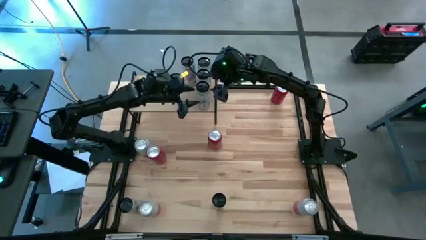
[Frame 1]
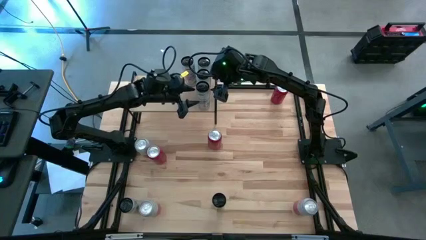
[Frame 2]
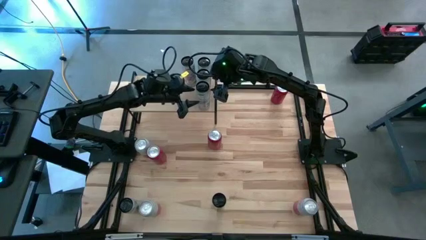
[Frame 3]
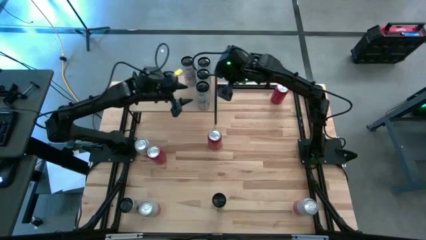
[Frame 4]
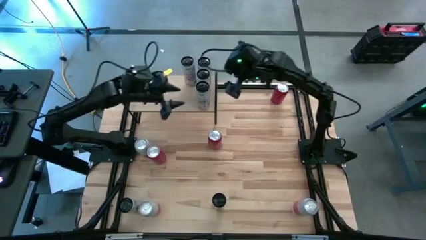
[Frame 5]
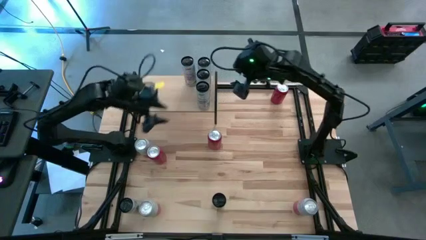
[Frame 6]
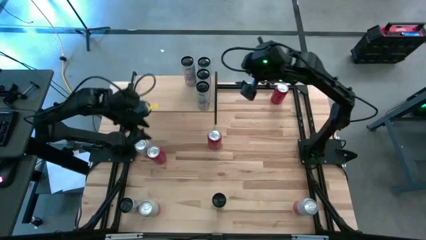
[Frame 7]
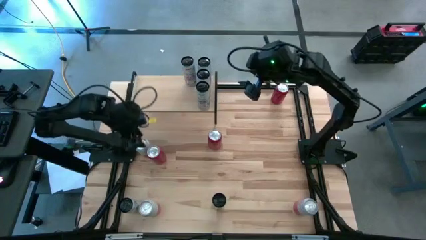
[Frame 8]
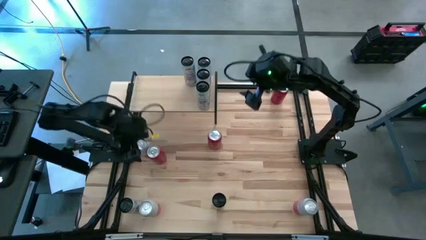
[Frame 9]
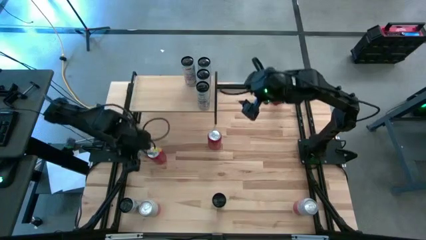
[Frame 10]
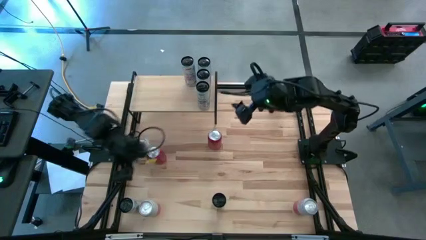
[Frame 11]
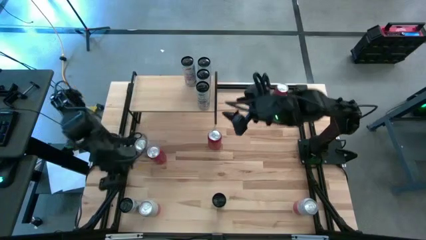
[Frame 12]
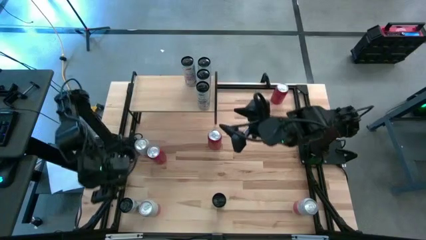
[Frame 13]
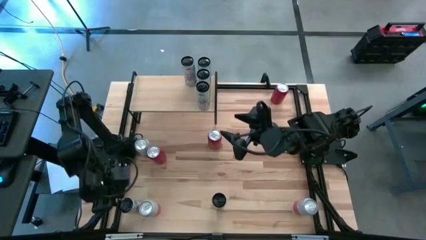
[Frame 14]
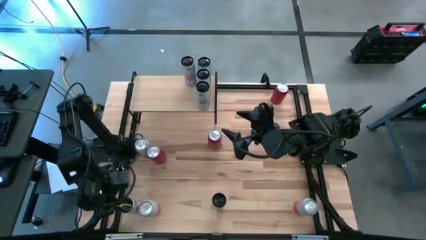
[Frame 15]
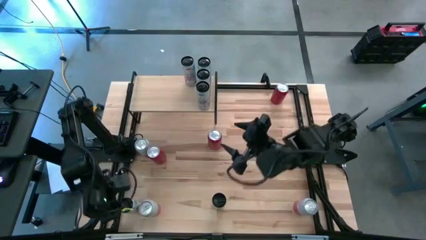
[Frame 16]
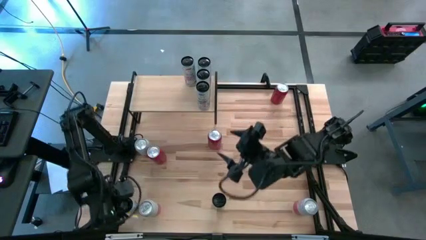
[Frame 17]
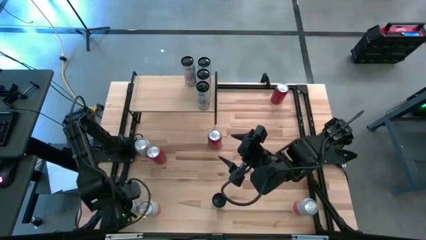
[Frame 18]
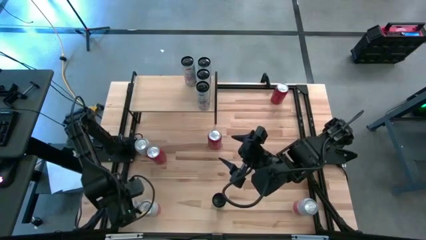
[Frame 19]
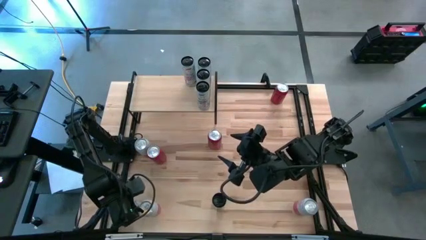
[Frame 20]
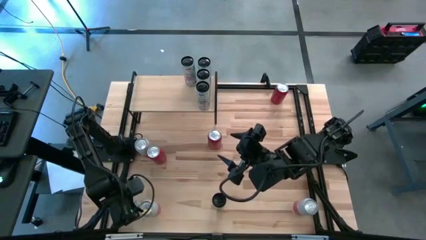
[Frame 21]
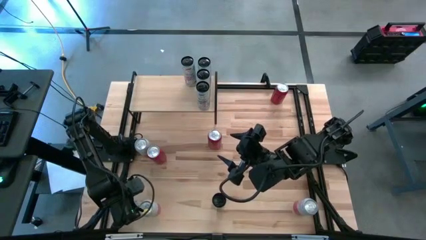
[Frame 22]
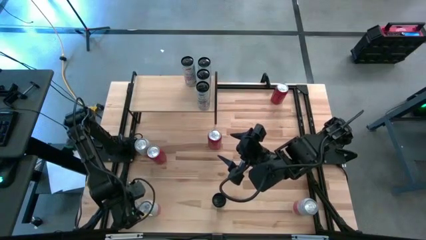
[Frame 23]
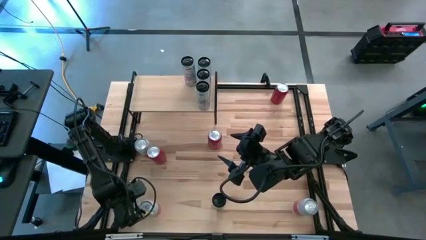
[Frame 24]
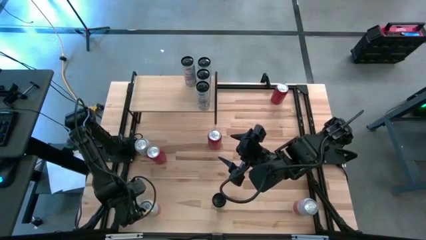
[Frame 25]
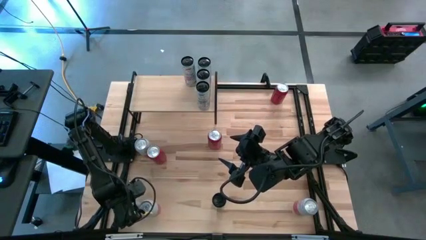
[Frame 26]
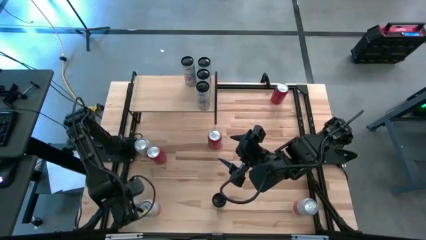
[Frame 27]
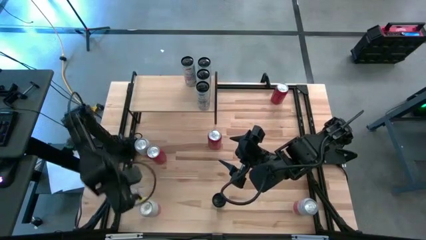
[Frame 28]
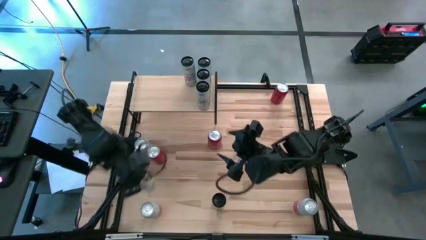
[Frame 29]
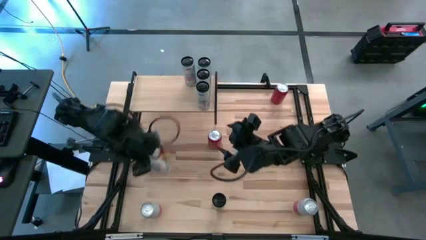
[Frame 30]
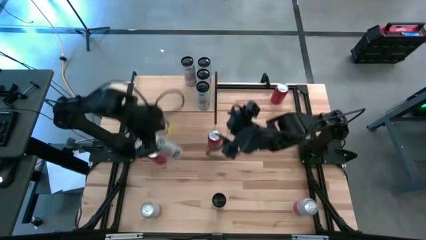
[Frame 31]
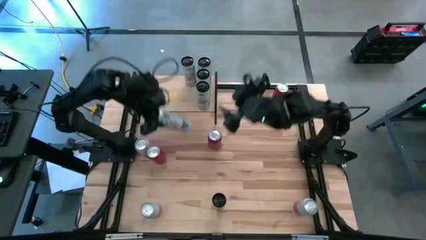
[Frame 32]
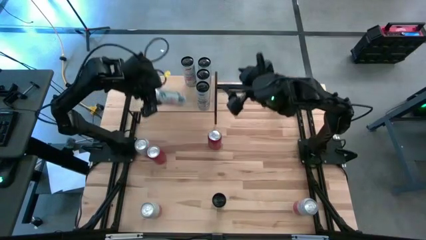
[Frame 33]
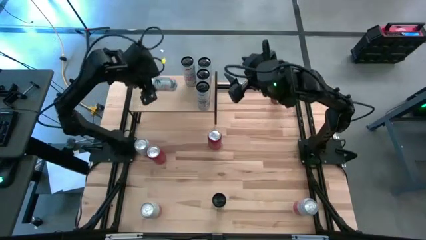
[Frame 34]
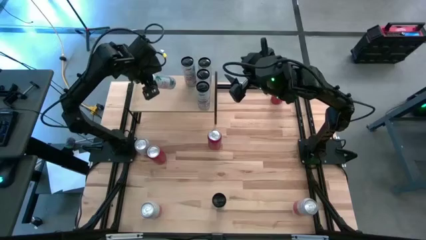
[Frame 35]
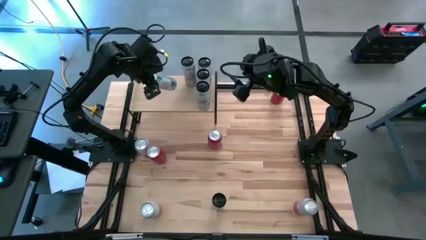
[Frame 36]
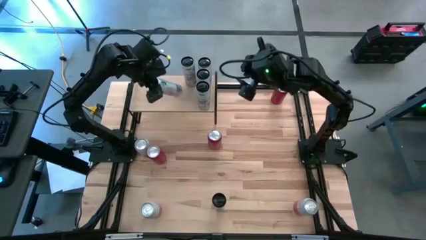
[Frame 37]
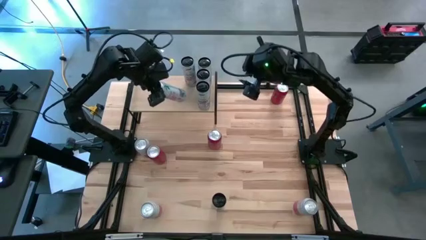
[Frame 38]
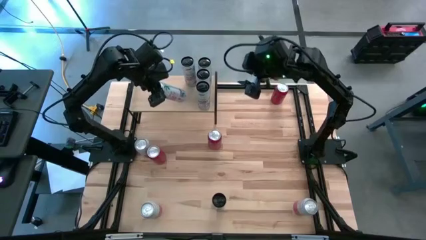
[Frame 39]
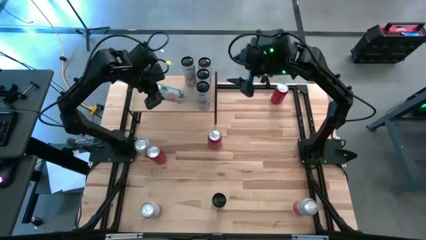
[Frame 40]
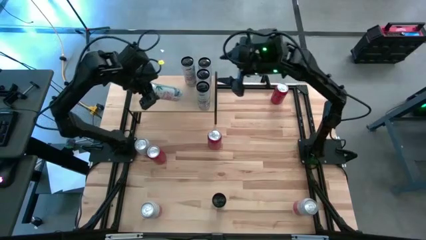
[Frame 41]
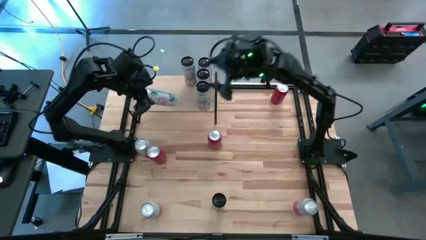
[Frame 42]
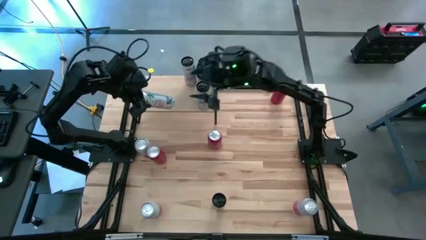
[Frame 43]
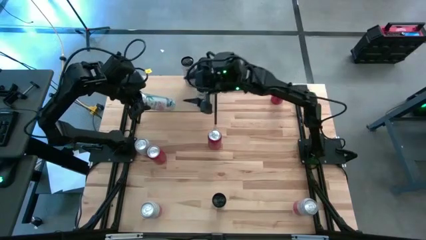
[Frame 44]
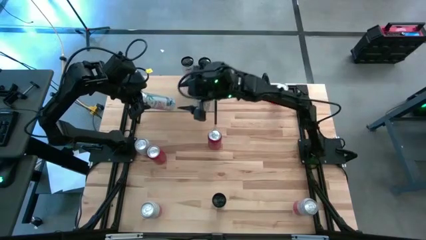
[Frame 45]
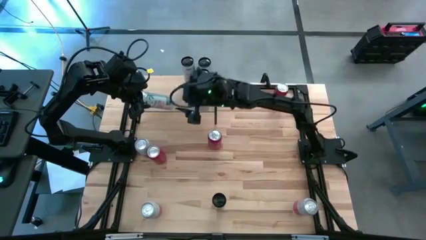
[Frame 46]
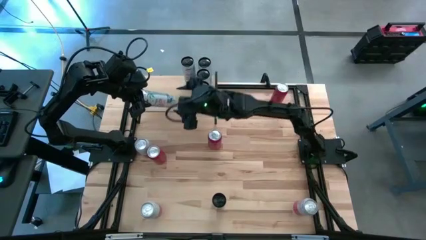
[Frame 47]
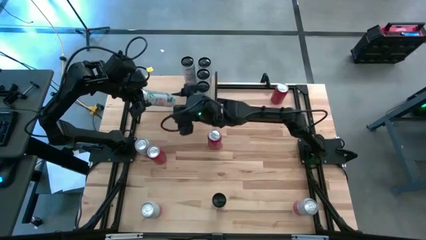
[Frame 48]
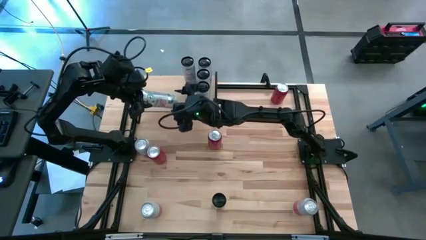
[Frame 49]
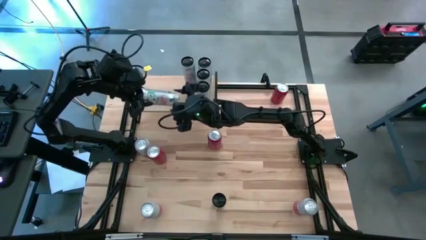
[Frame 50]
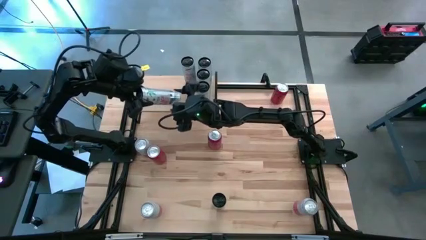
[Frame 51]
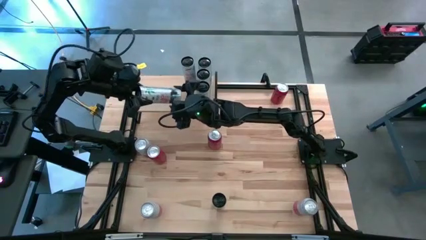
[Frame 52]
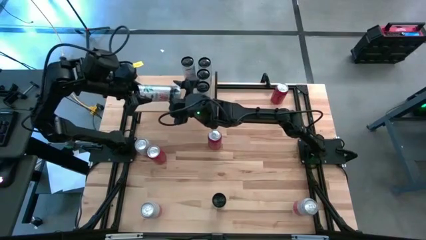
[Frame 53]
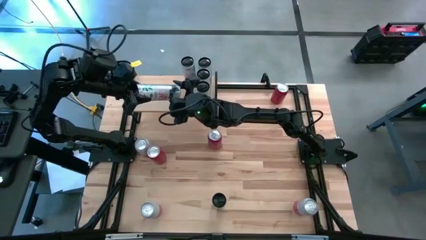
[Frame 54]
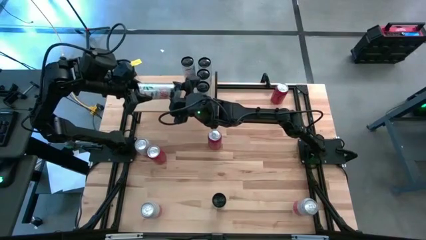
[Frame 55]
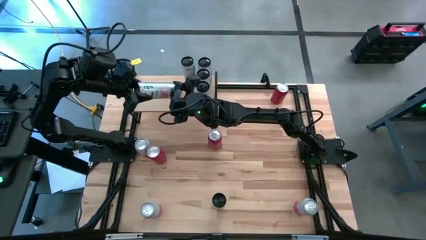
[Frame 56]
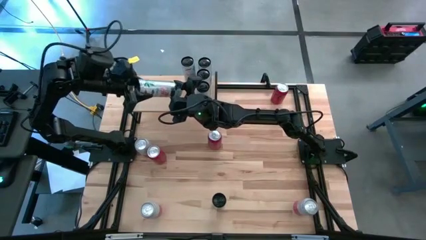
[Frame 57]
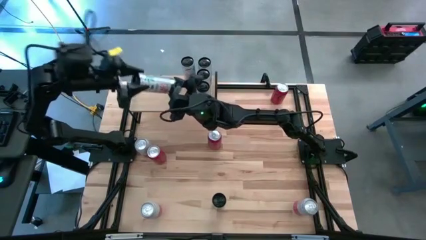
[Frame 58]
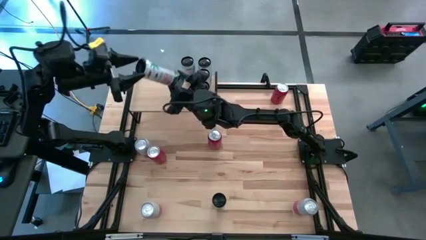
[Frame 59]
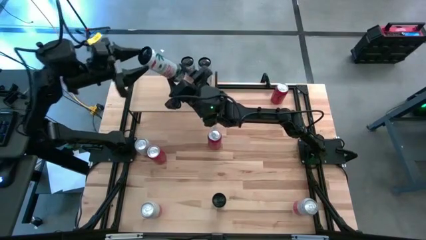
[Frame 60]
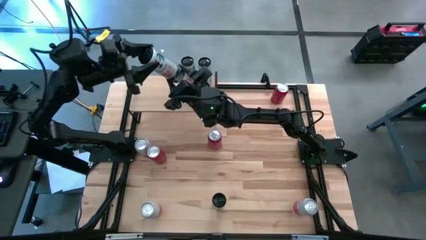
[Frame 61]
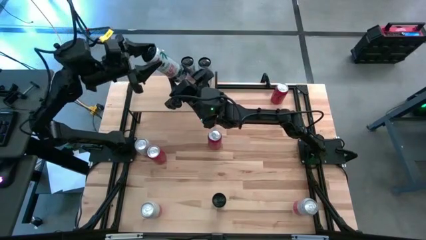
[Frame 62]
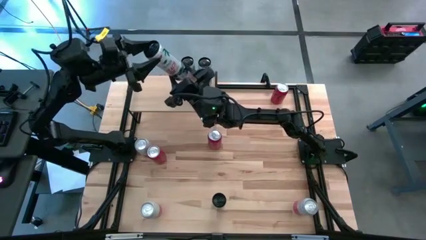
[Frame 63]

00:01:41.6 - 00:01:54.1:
Task: Place canned beverage on shelf
Put the left pink soda can on the shelf aligned with the other pink soda can

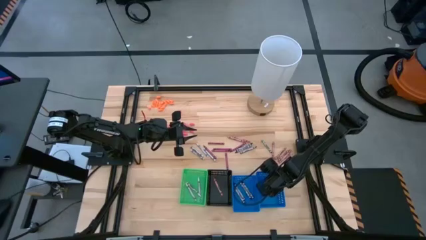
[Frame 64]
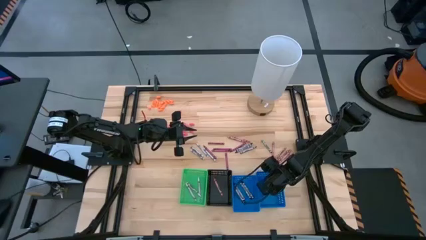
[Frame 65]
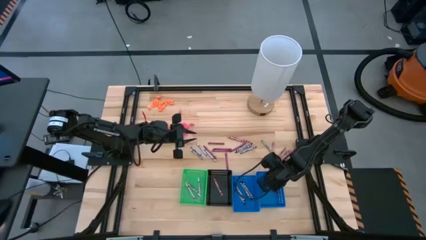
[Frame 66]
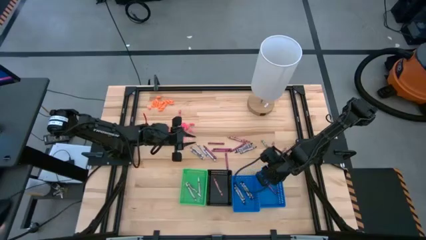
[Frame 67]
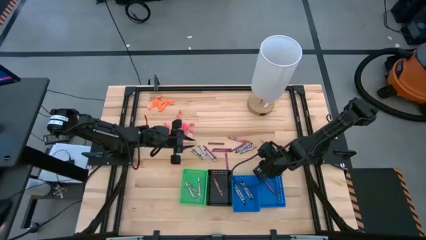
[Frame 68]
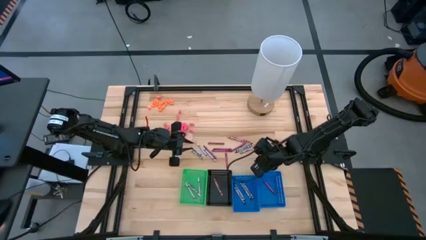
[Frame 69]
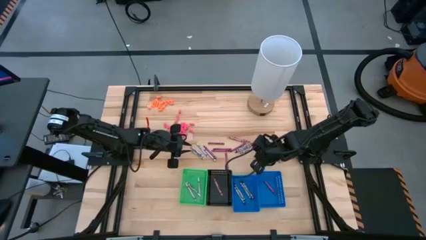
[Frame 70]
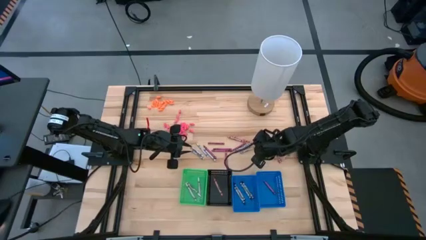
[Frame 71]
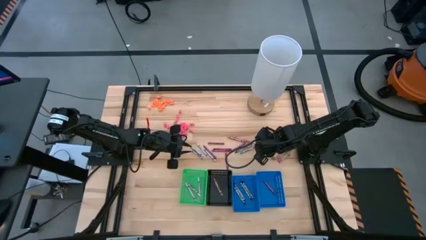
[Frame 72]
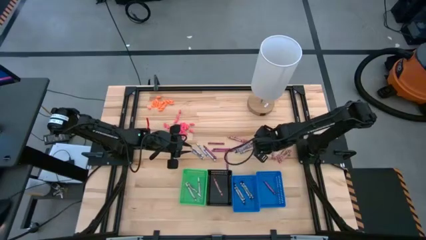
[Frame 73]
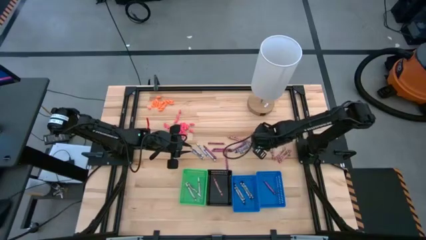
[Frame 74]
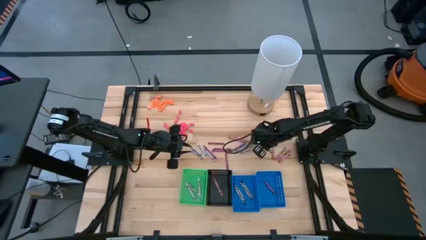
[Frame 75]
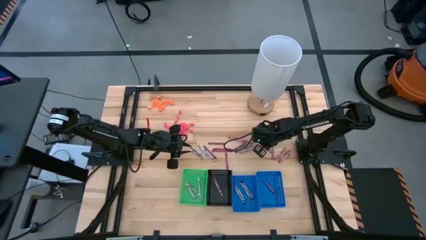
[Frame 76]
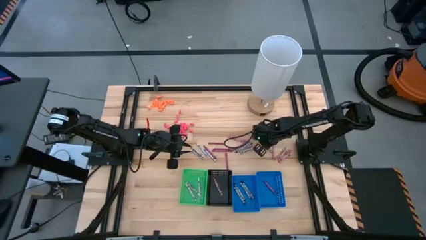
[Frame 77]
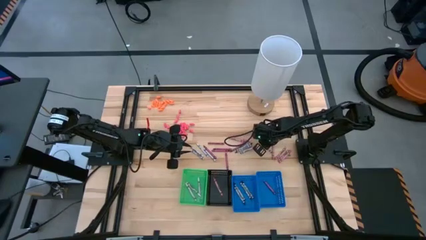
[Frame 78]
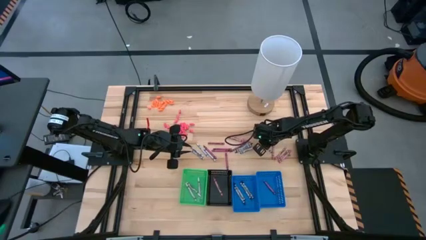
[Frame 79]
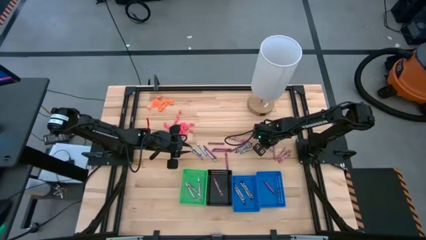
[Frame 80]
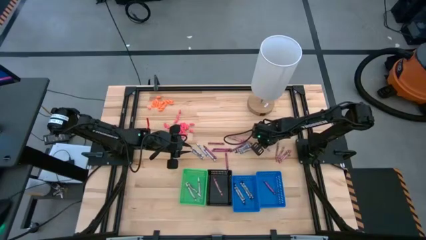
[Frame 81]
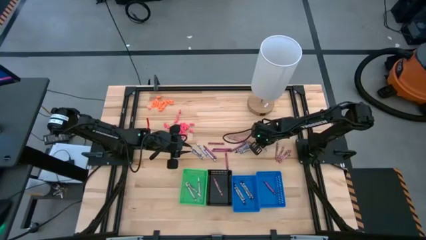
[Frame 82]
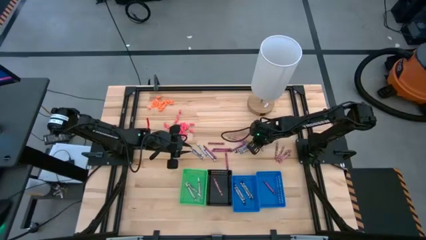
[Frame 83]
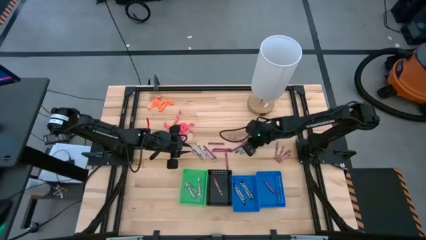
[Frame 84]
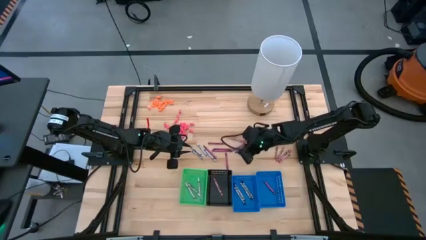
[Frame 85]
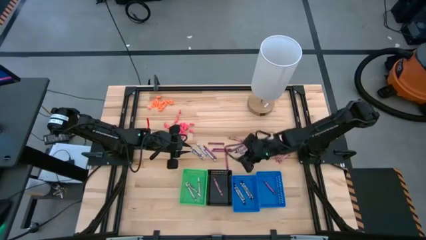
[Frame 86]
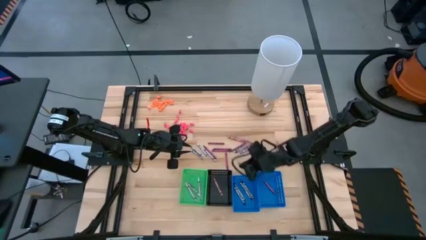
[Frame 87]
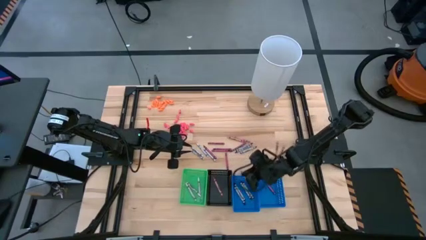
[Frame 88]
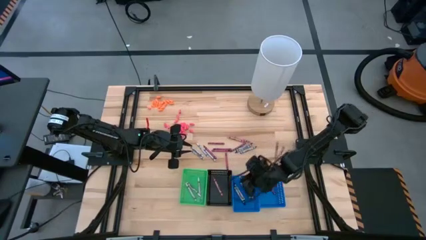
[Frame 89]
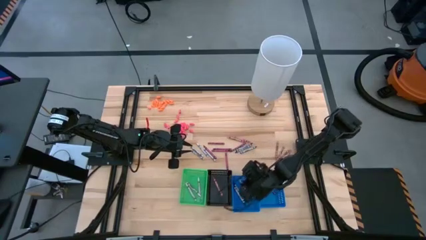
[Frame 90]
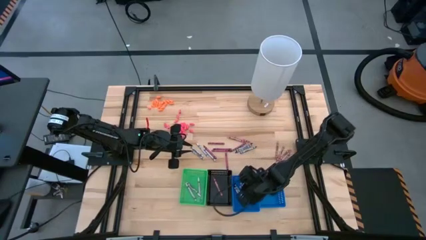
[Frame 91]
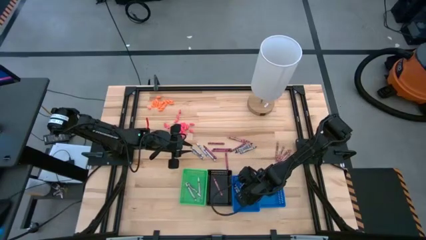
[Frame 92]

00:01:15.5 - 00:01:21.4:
Task: Sort crayons
Put the black crayon into the left blue bin
